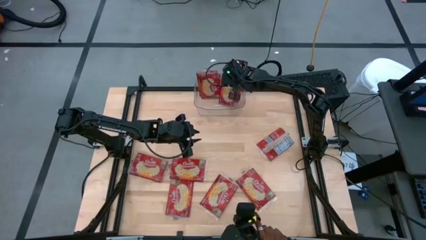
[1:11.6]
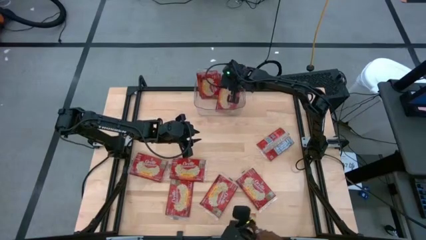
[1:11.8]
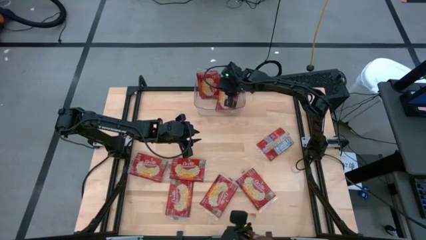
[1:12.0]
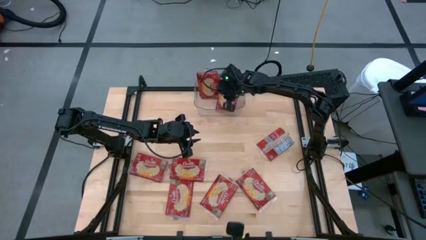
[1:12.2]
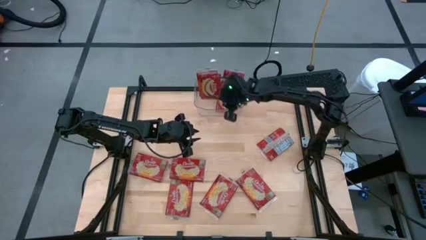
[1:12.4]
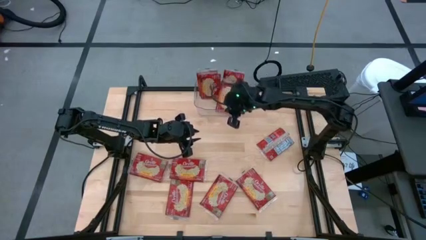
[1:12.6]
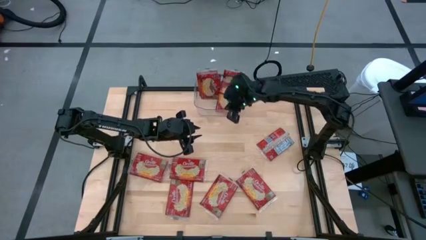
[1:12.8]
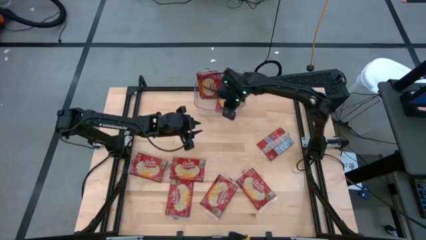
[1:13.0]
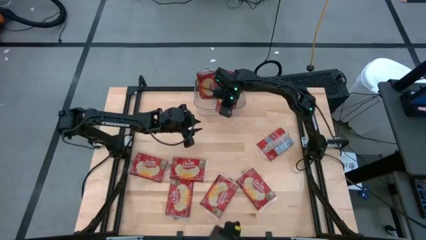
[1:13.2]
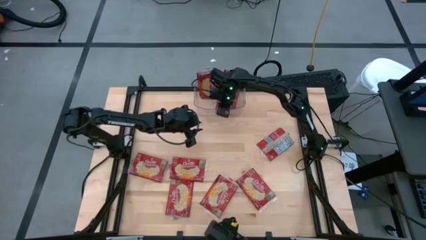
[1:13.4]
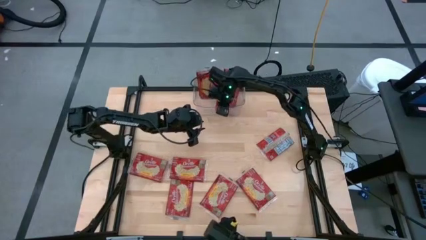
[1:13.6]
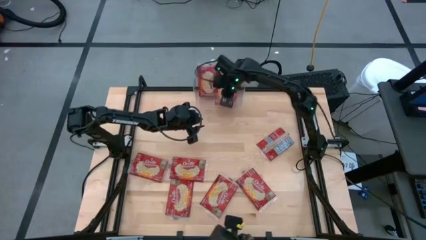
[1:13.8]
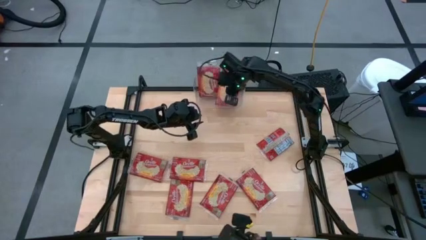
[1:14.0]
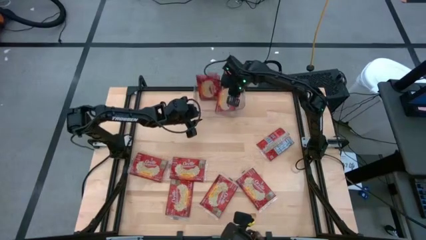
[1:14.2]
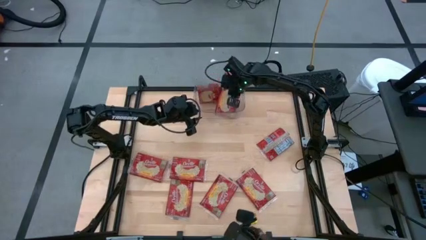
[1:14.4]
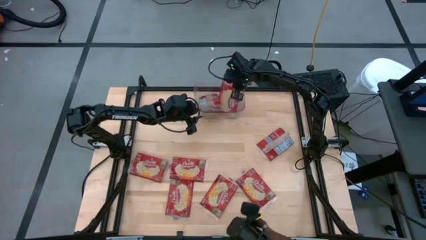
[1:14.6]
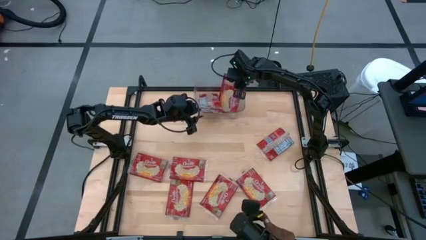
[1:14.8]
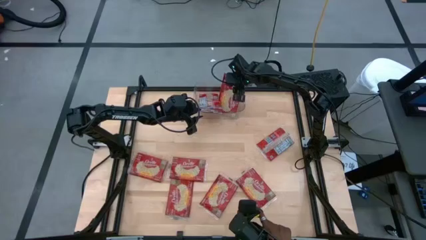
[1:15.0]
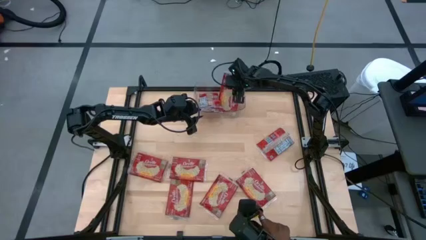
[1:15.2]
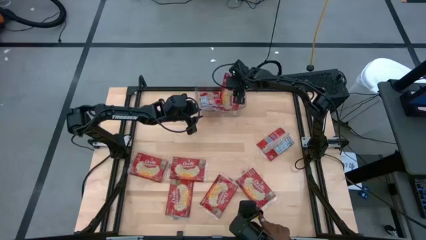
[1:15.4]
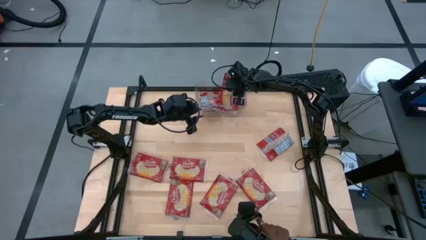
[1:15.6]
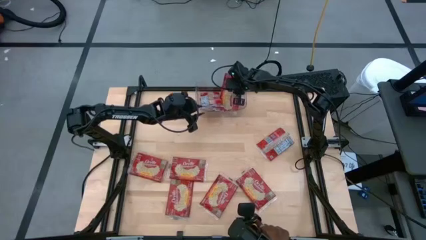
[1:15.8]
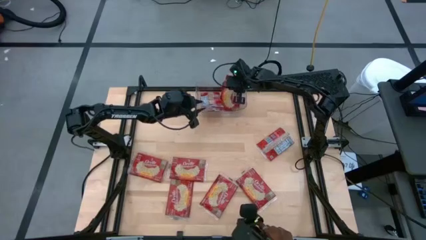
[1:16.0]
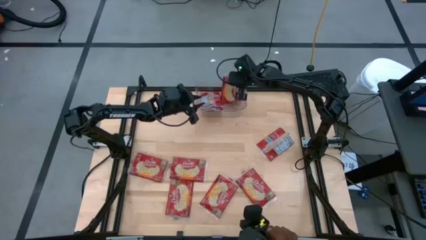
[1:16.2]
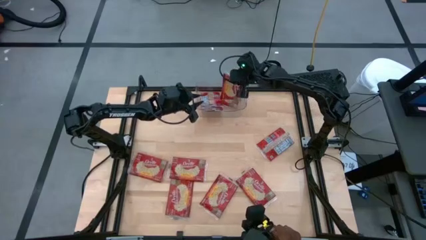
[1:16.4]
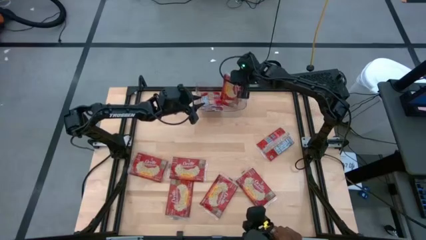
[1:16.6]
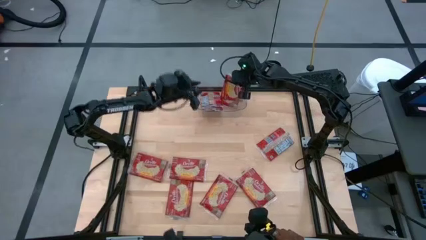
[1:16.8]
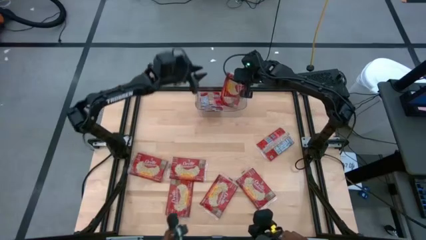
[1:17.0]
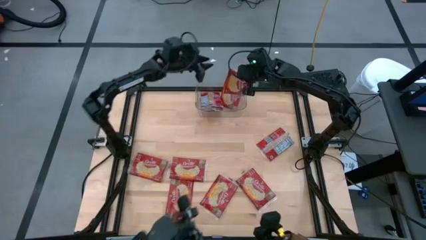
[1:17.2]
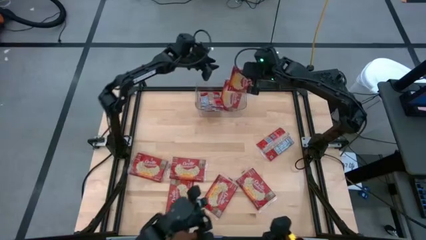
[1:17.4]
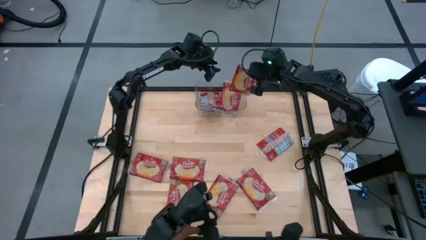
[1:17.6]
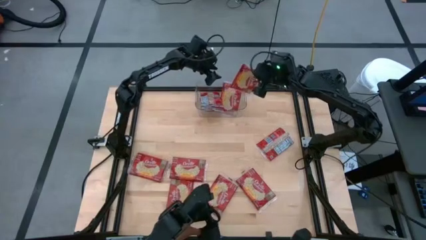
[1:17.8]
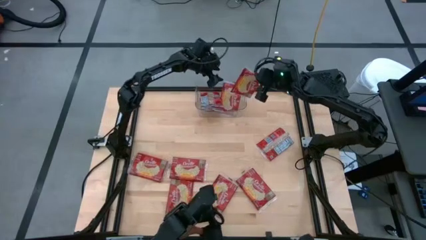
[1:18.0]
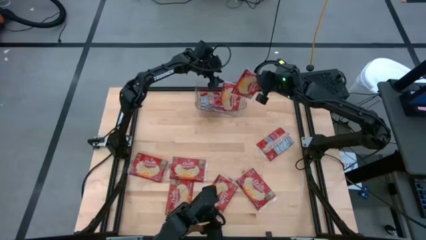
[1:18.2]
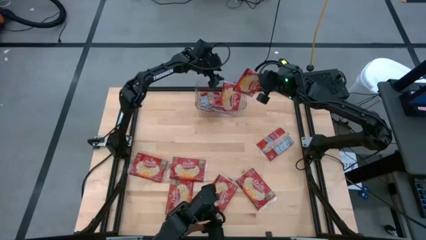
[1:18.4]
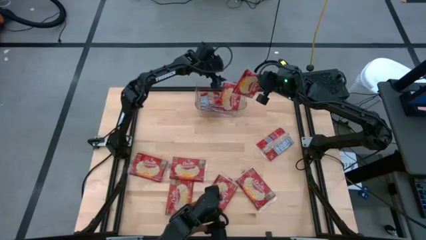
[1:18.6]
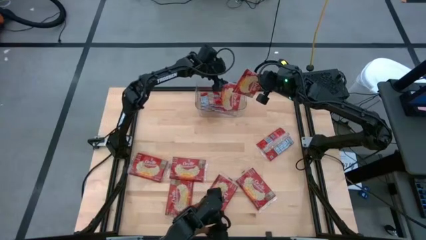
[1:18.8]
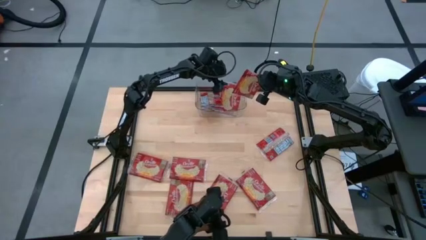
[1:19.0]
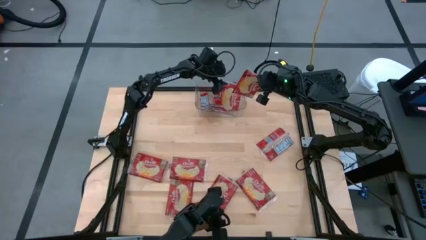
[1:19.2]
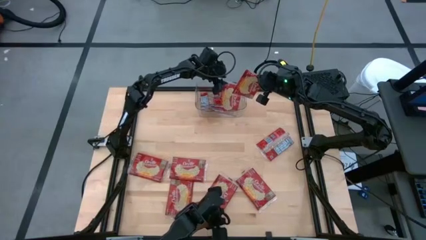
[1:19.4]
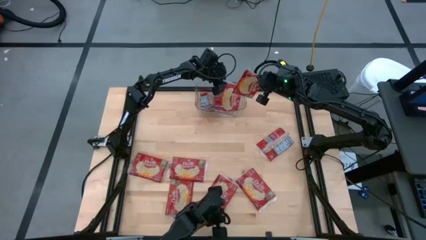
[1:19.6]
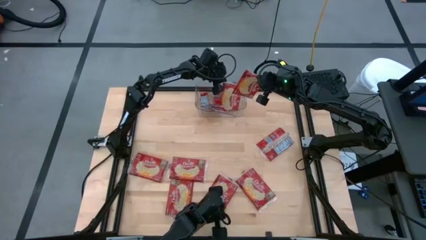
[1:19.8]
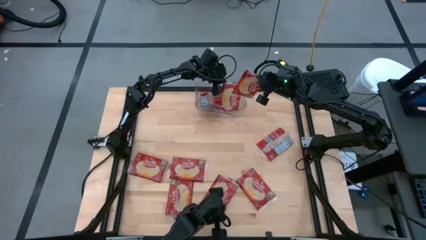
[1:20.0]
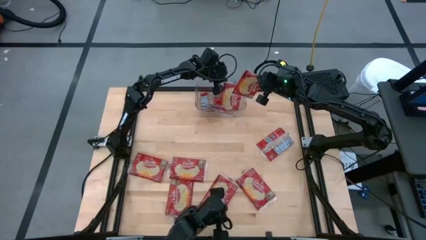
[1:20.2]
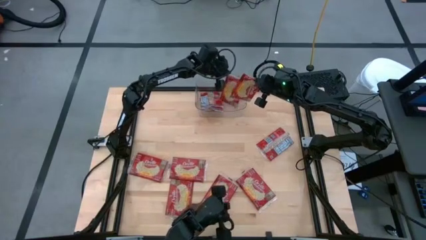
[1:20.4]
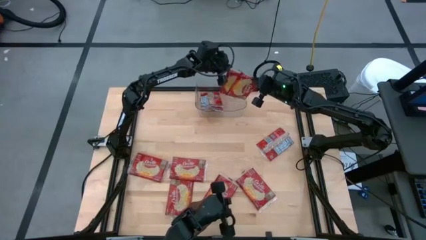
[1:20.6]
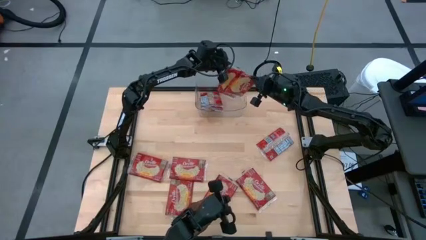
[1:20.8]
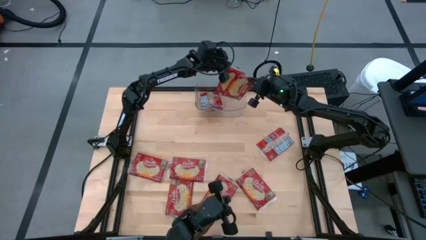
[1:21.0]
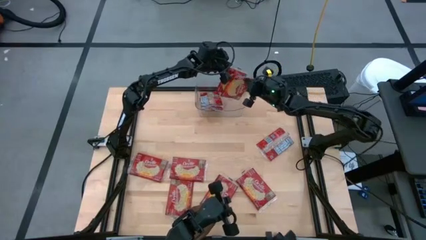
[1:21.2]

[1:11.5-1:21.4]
Task: Sort popcorn bags into baskets
Adjust the red popcorn bags in the transparent bin

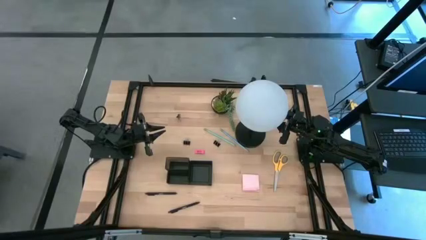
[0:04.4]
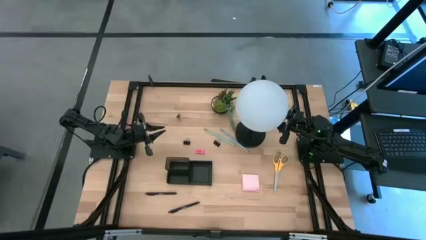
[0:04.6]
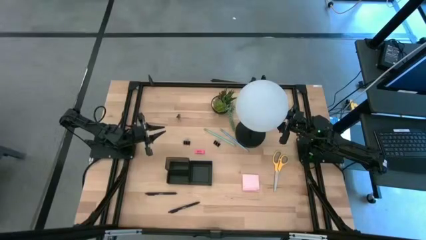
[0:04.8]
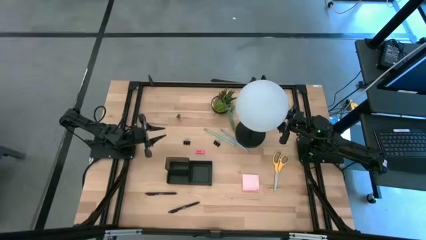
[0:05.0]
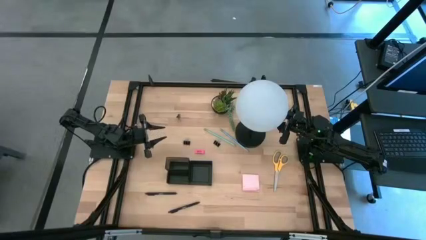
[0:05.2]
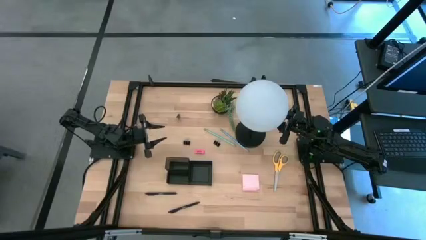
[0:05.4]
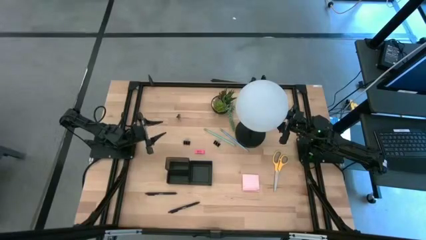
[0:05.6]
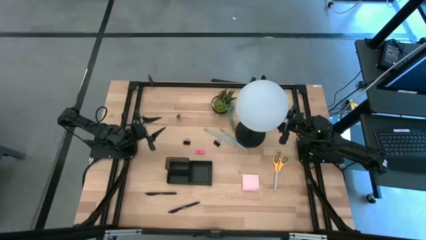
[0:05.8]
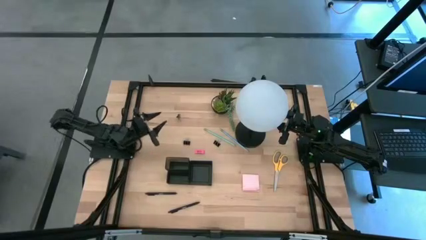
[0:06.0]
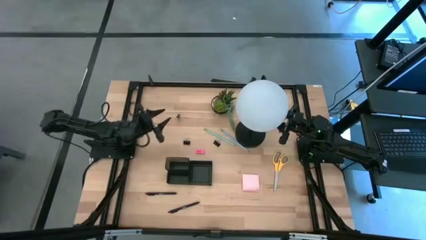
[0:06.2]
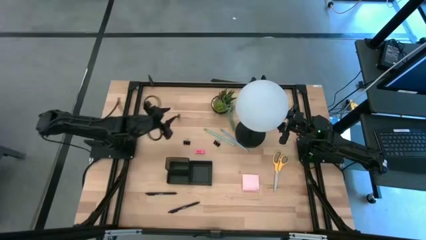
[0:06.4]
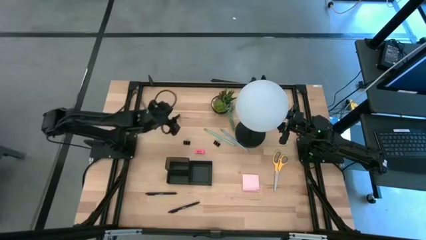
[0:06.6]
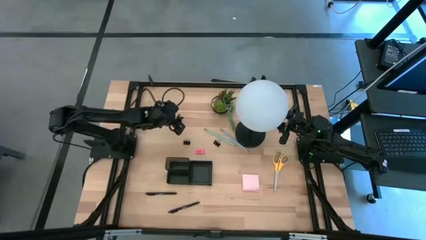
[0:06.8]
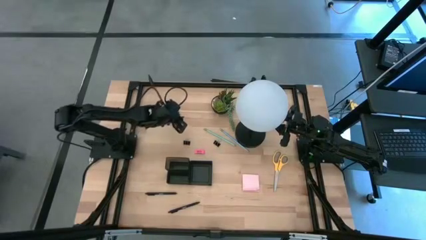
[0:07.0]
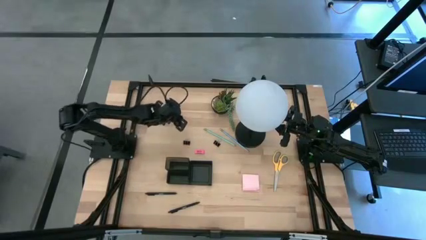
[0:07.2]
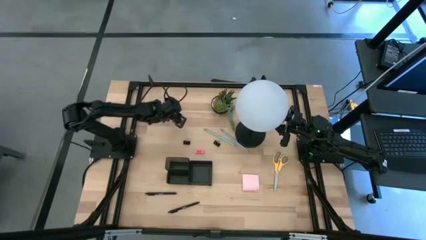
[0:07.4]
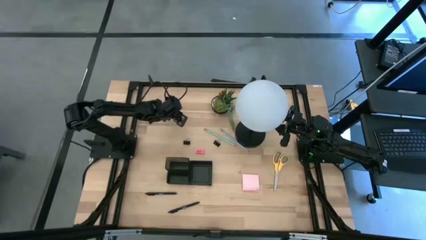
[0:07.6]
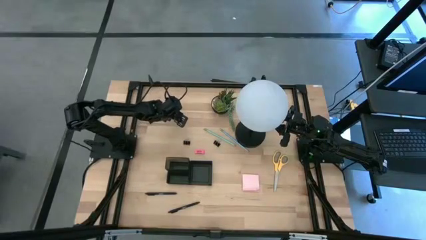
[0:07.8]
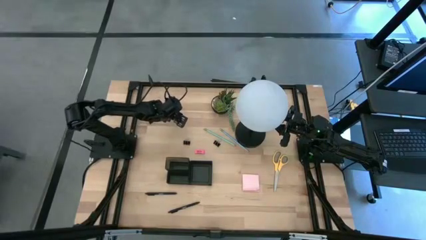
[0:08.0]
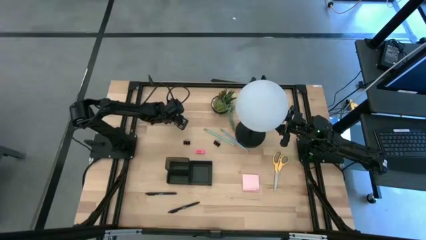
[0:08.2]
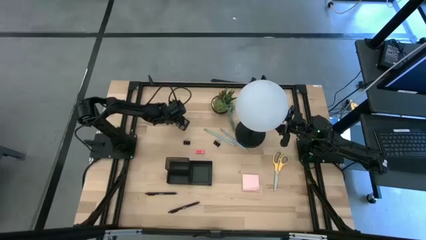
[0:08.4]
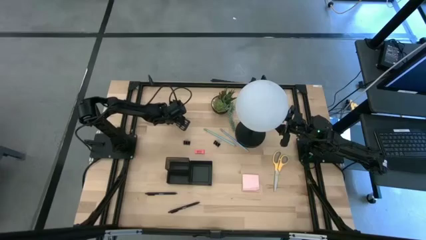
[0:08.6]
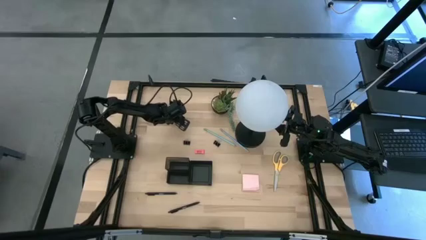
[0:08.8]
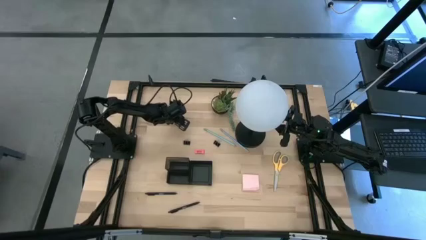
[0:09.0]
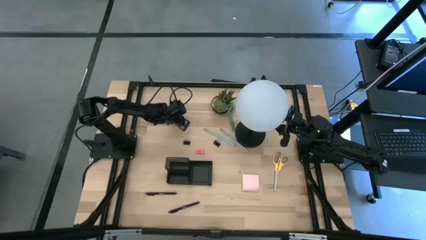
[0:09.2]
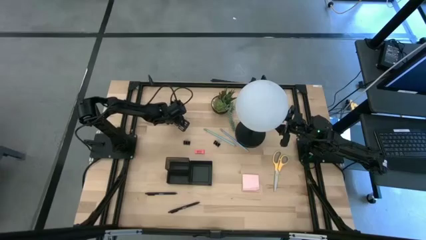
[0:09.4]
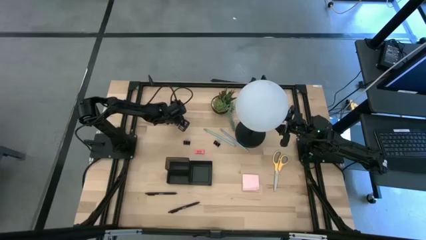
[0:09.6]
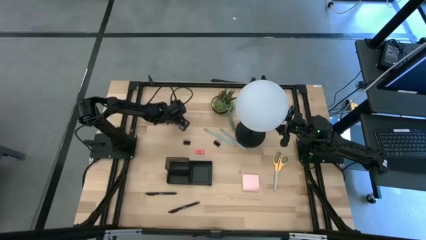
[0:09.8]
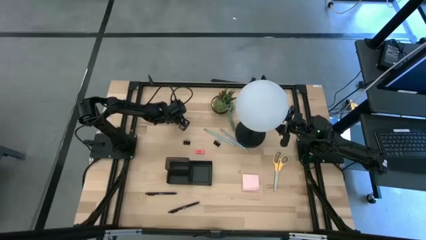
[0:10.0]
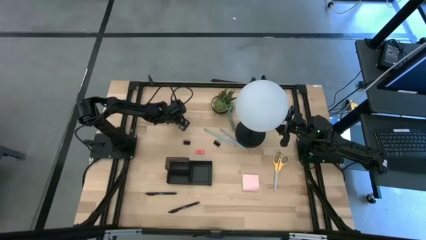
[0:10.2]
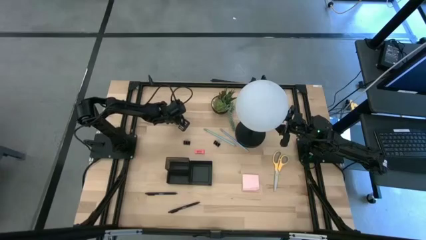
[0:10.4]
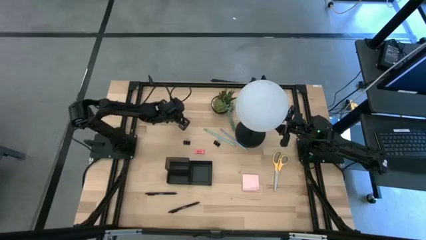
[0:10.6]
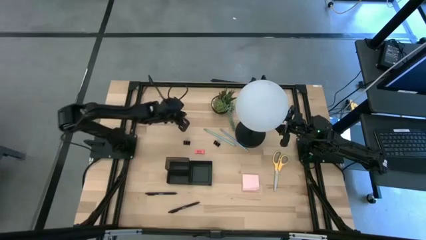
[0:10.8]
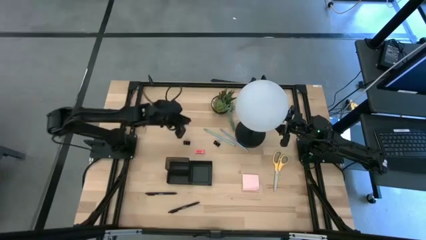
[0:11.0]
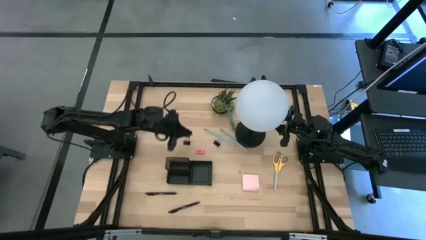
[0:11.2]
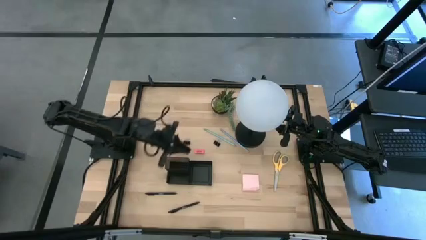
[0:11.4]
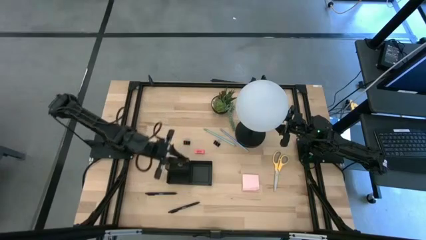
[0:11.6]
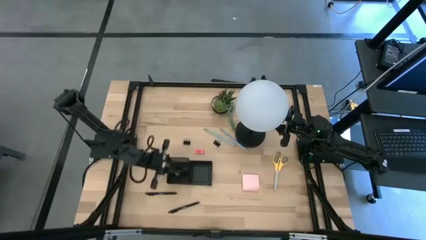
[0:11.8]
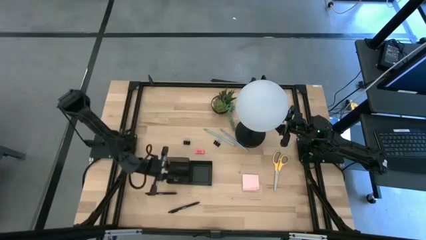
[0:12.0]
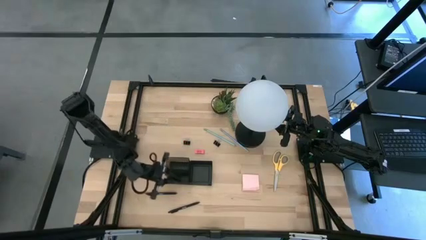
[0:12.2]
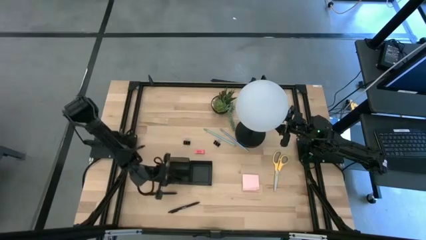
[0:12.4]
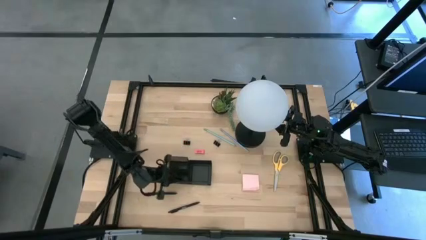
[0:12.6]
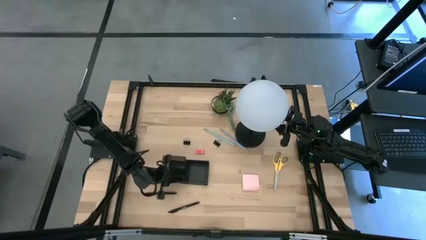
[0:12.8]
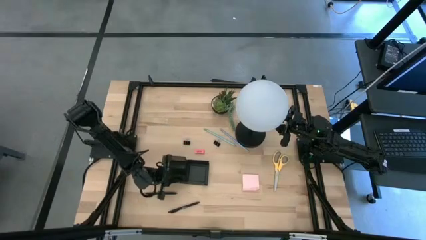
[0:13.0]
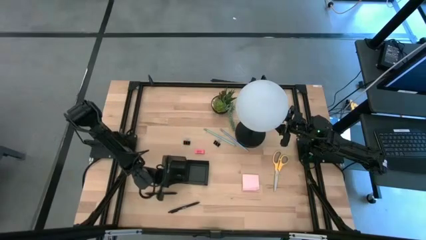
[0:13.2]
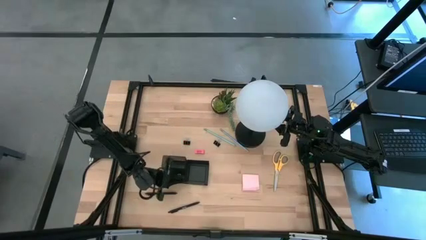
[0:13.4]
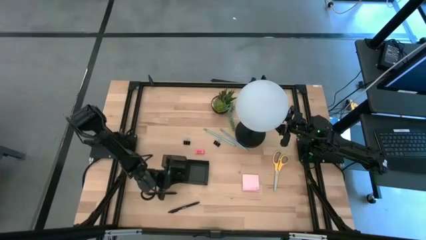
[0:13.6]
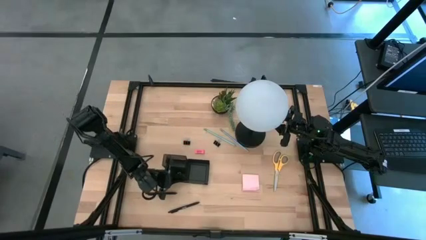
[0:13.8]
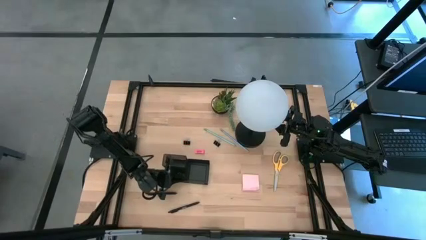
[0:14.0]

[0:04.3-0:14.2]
Task: Pick and place office supplies into organizer
Put the top binder clip into the desk organizer
